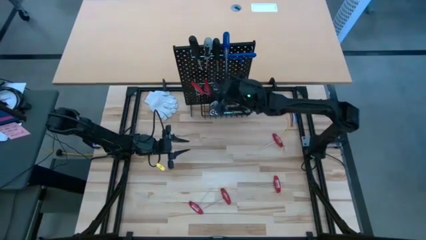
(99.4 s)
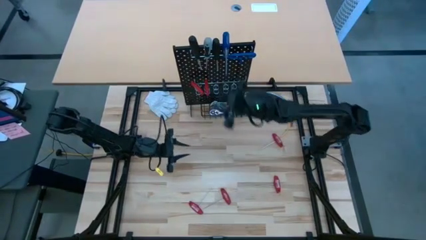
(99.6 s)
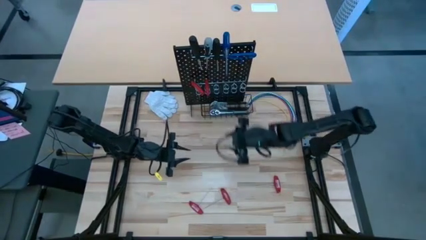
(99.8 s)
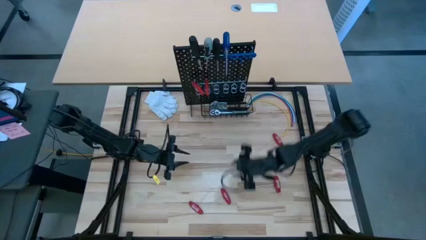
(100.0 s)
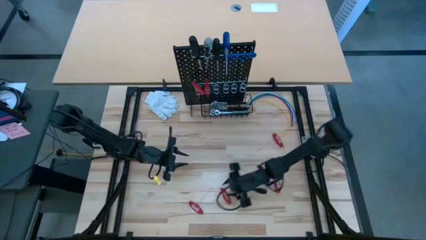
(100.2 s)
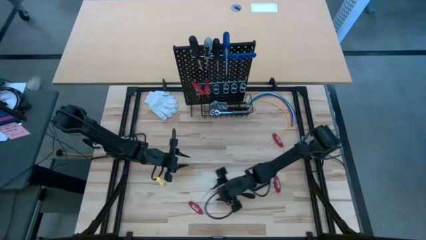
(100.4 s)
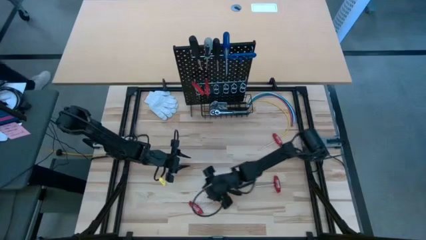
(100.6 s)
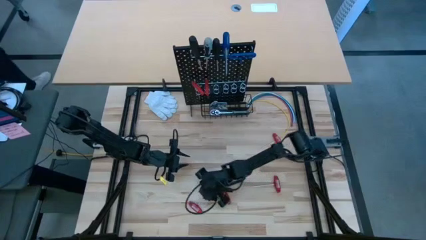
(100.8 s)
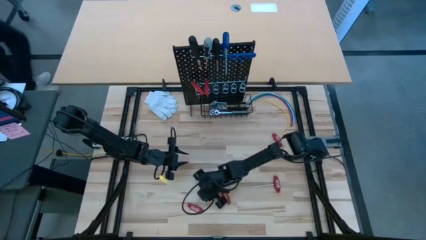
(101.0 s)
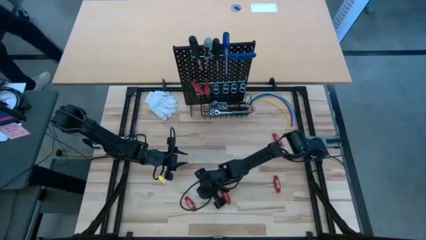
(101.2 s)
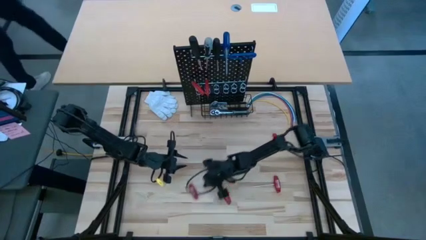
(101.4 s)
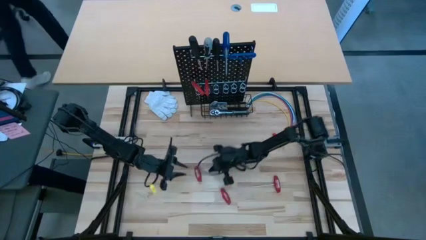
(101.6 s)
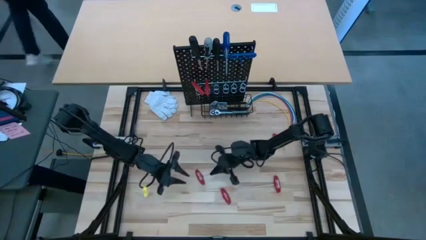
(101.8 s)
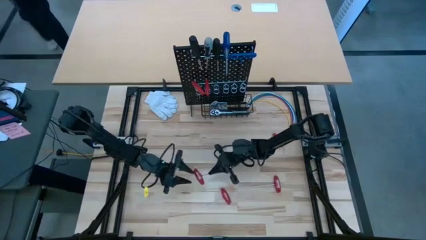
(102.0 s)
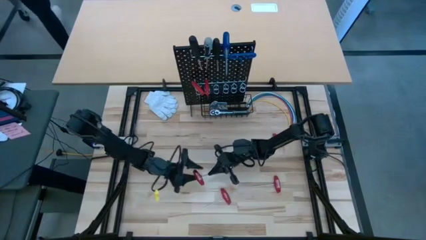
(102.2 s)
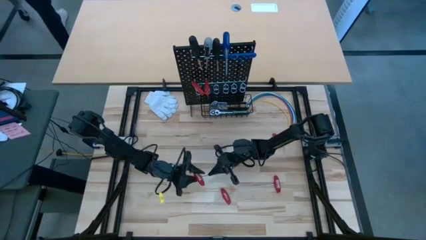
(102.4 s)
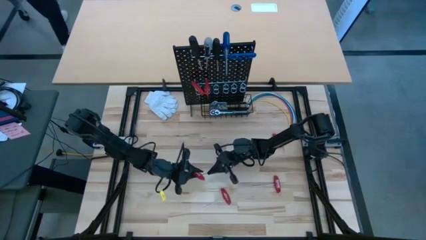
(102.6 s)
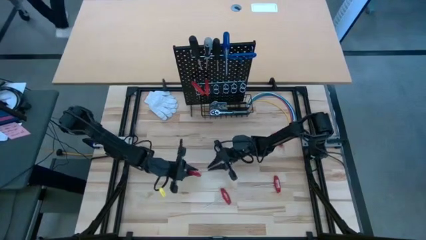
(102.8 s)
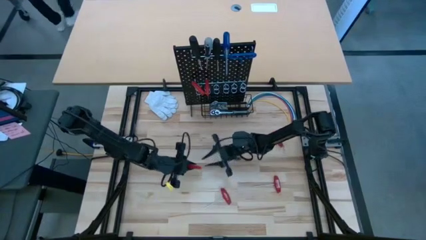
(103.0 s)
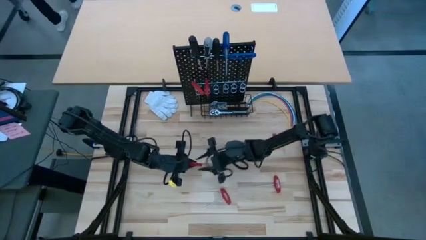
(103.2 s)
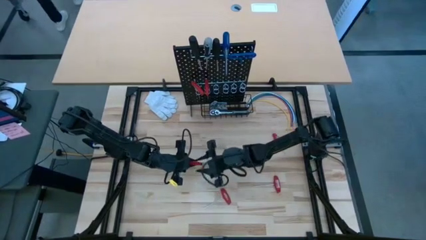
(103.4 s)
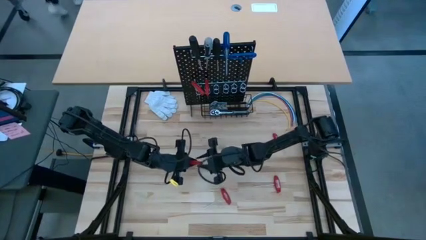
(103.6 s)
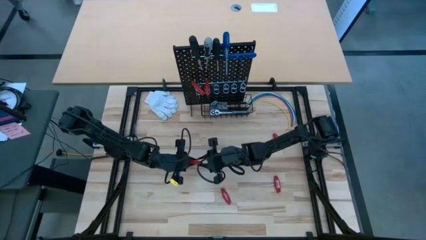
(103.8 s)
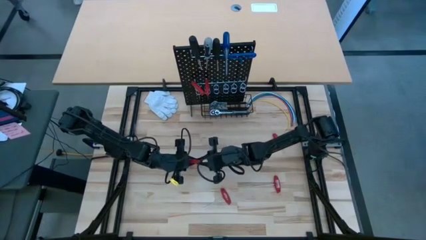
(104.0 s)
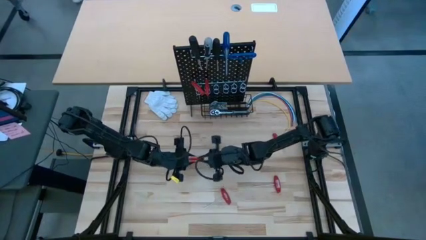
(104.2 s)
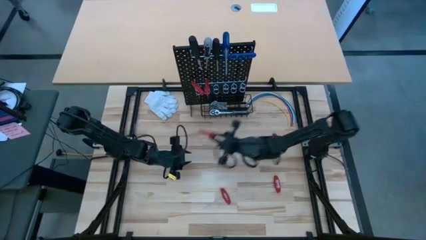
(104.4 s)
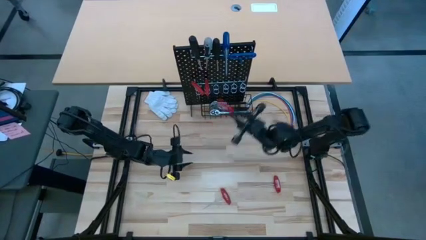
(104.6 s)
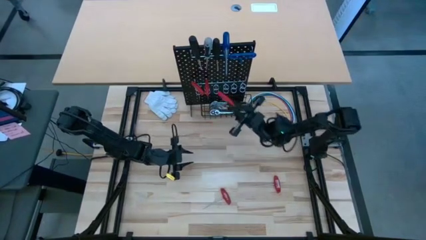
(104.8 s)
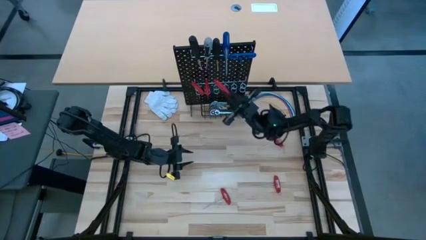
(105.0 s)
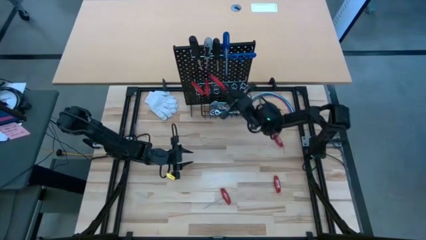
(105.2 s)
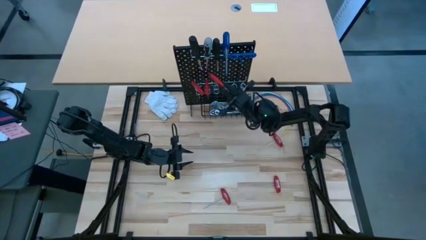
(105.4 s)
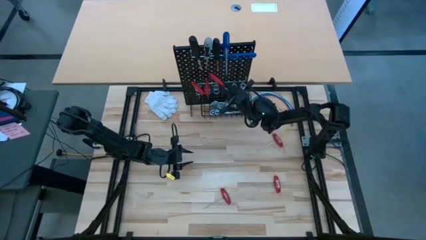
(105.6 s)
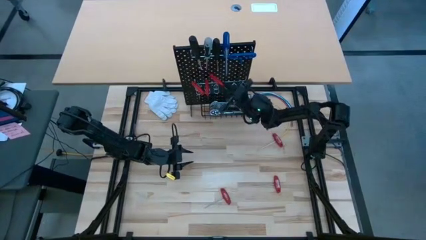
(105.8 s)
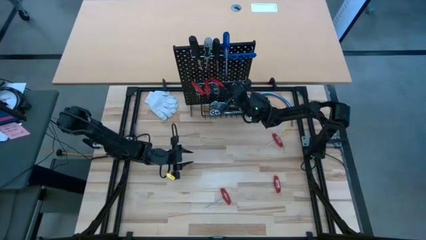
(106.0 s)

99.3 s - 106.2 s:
Task: Hang tools onto peg board
Hang the red allen wrench on the pegboard

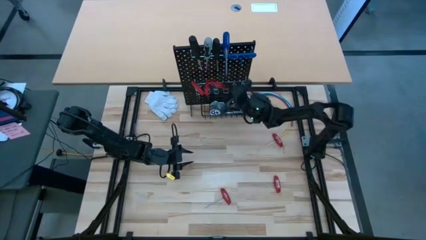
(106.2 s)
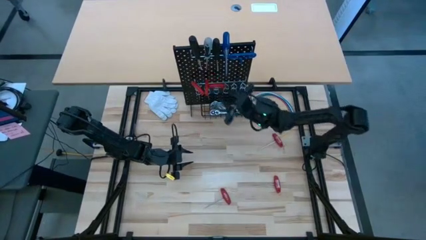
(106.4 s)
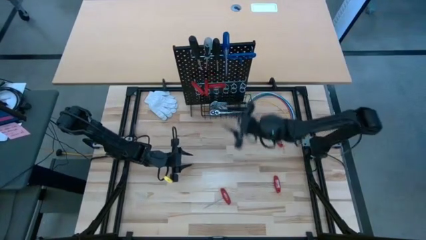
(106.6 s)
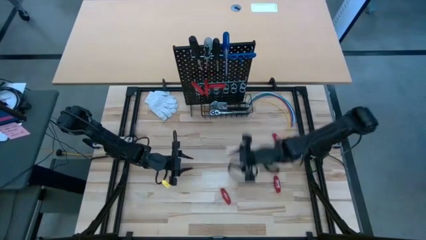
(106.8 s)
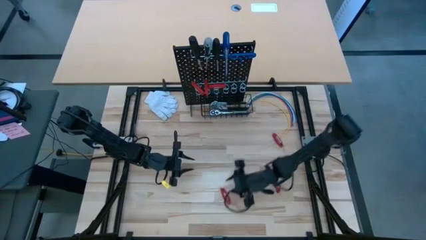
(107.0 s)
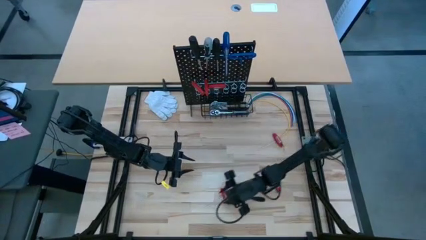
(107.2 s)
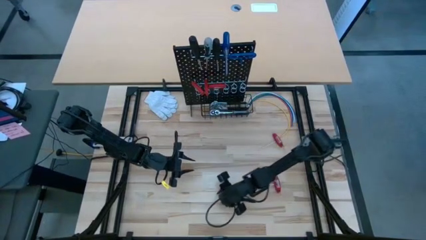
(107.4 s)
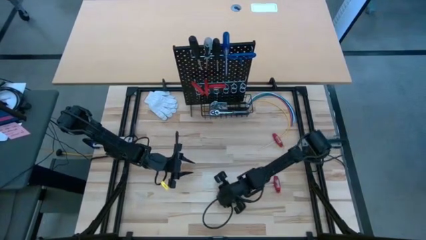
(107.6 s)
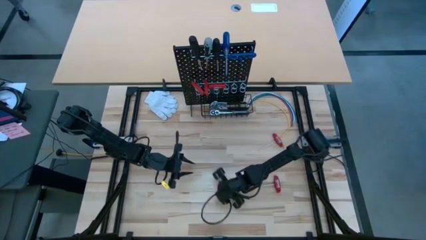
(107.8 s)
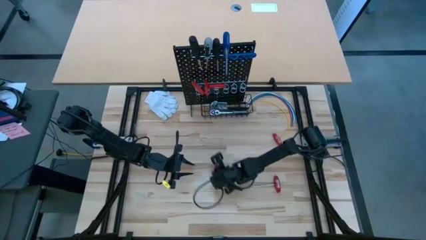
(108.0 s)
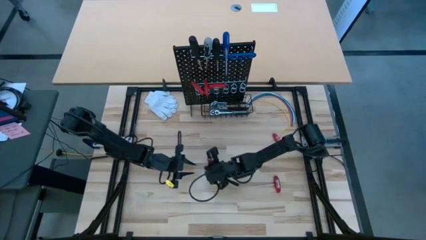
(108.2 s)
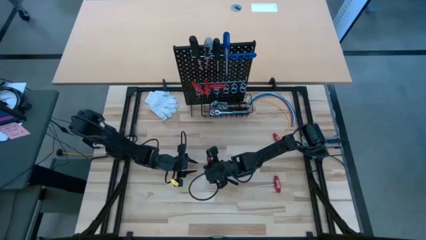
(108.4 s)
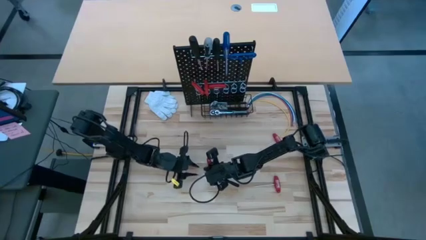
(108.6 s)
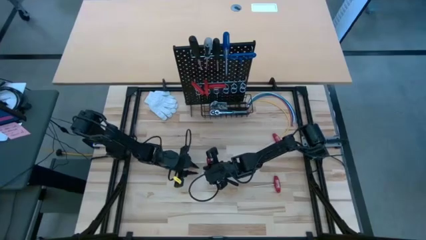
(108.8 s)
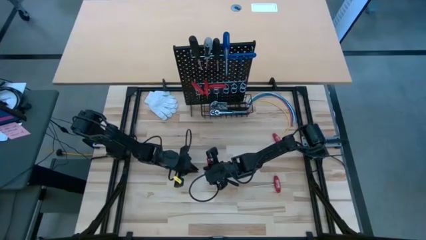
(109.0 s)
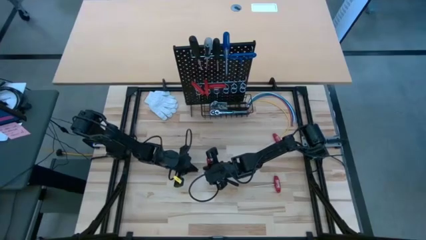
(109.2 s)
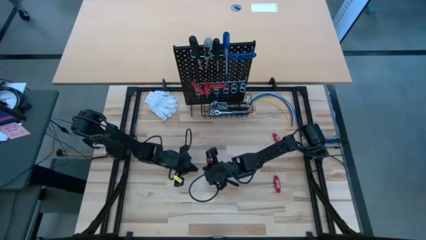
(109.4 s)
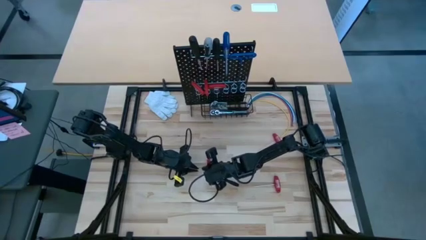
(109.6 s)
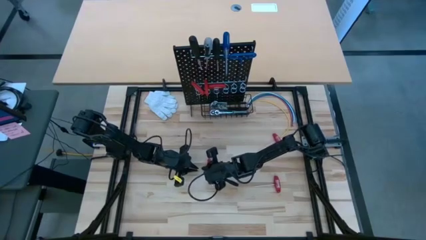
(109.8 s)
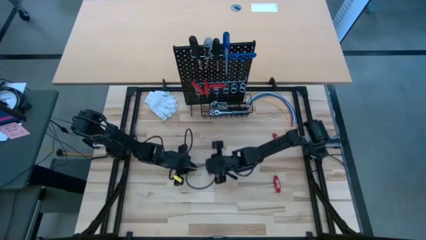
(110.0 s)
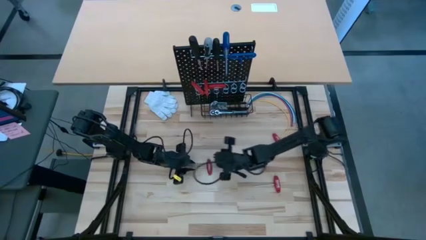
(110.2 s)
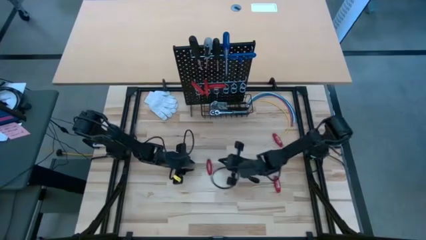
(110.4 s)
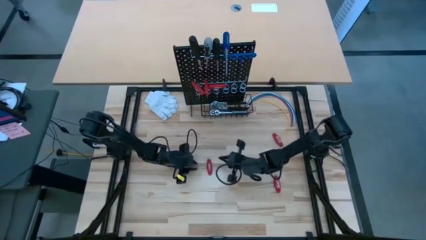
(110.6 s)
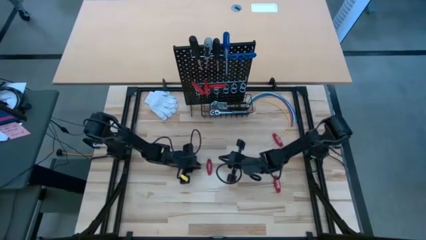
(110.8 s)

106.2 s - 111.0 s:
Hang the red allen wrench on the pegboard

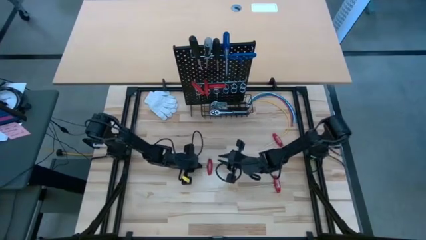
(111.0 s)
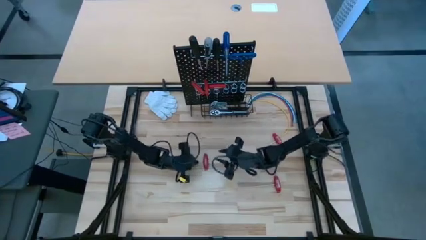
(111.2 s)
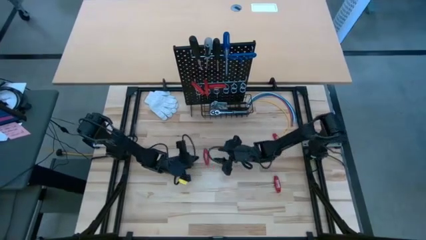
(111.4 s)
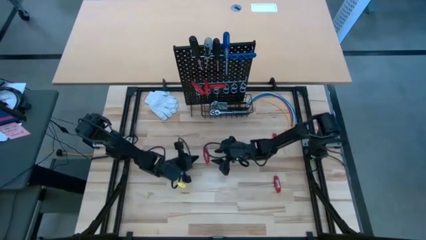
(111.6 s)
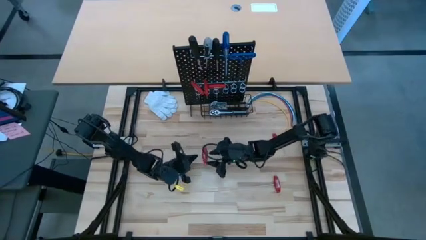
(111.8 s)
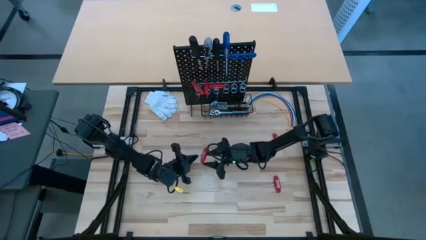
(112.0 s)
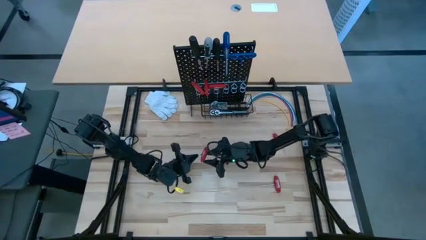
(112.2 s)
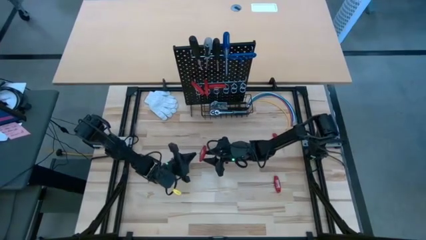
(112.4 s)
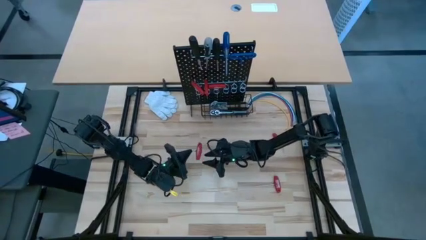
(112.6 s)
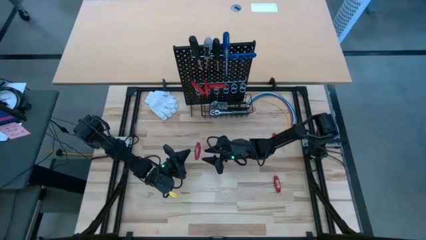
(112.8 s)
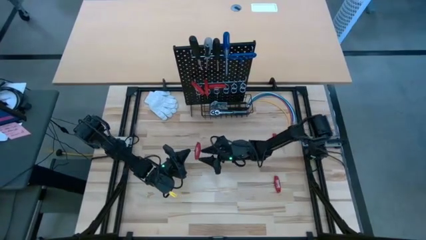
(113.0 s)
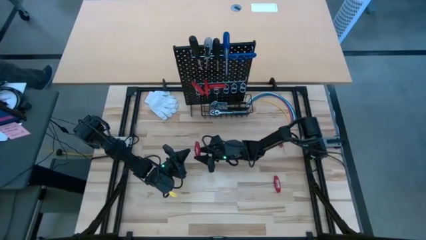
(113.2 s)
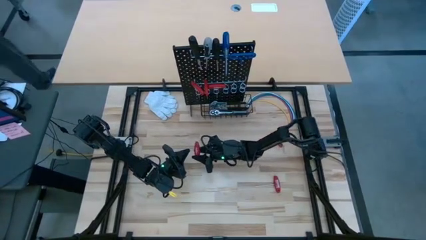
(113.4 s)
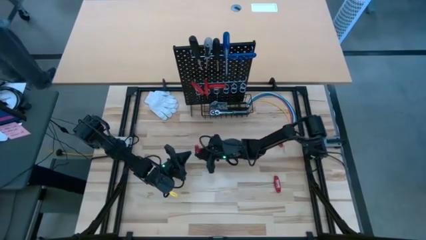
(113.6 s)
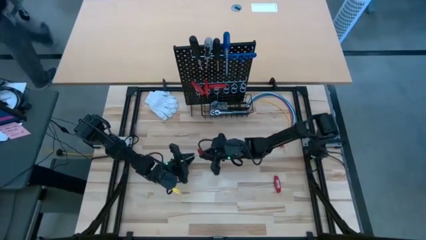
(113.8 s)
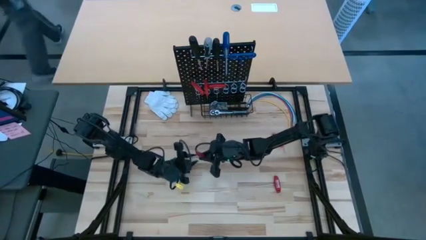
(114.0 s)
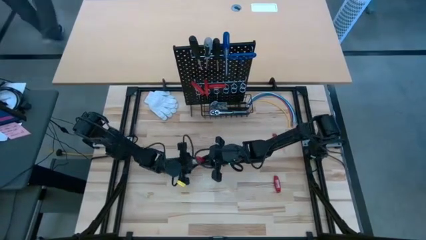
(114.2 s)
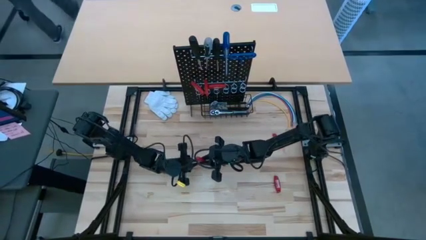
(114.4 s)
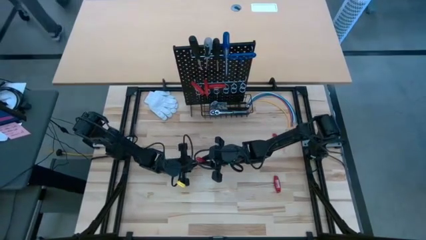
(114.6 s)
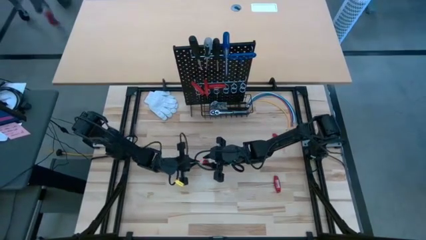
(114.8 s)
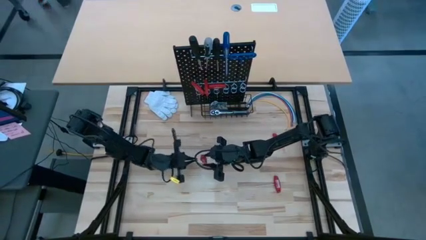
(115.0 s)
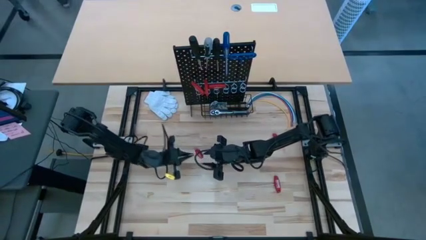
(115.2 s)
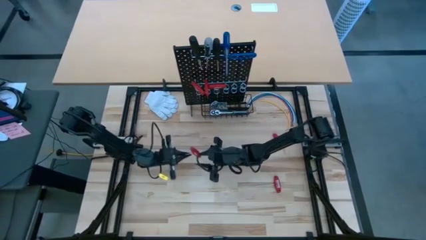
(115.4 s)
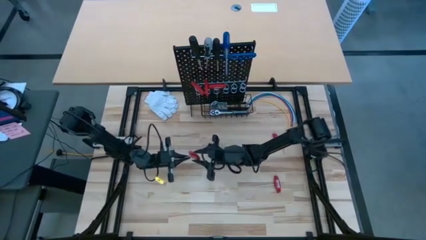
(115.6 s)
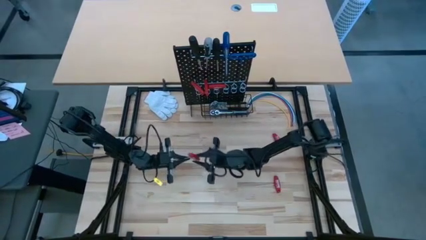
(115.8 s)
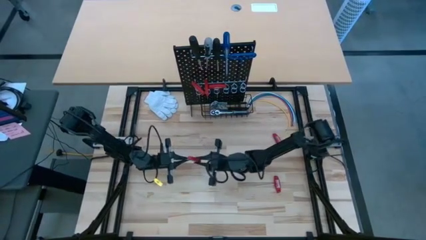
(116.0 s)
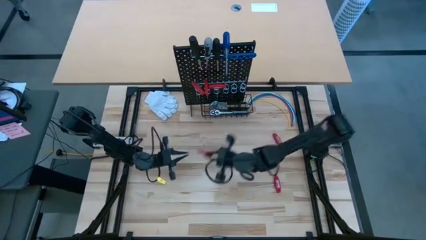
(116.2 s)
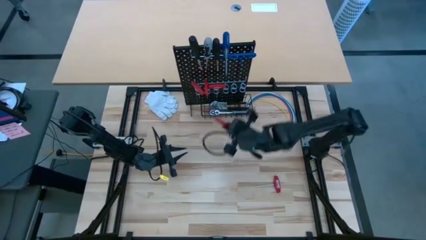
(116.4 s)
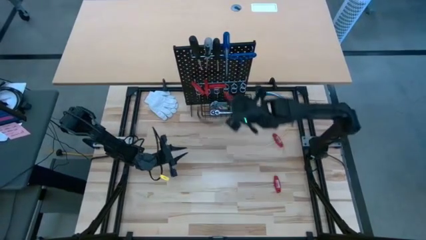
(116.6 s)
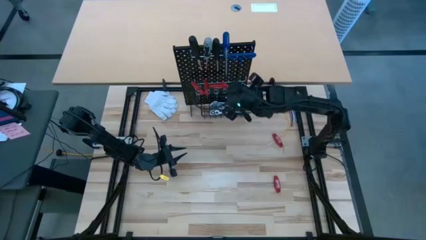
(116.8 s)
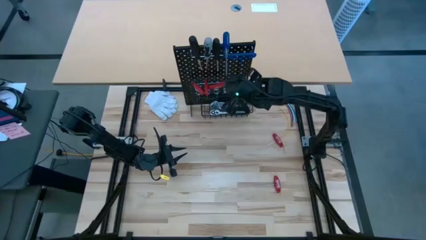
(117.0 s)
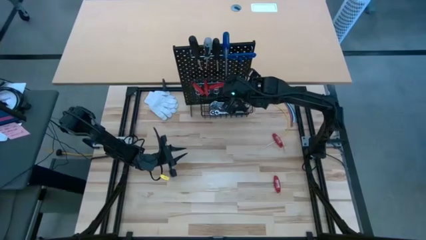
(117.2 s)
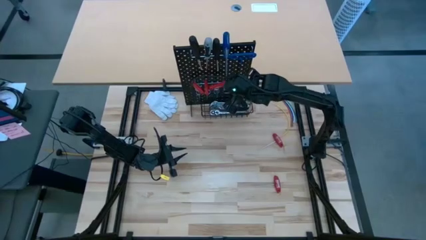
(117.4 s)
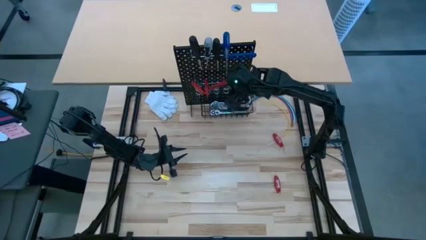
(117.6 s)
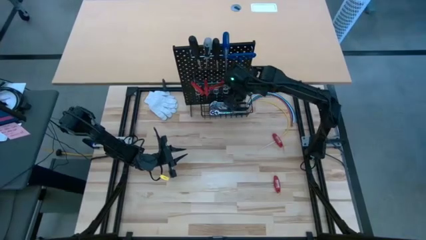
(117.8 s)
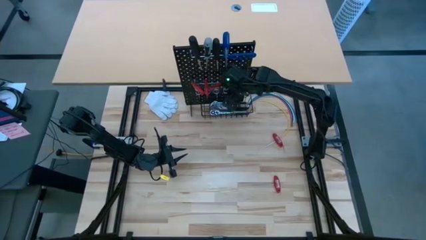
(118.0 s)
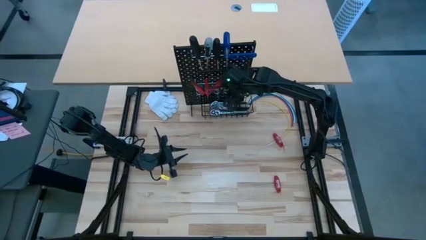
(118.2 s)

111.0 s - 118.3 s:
Hang the red allen wrench on the pegboard
